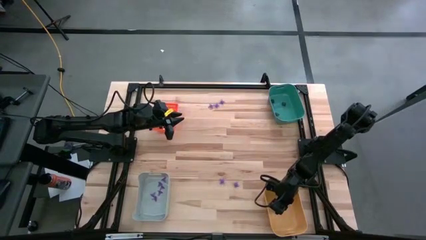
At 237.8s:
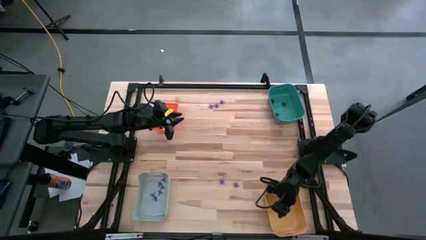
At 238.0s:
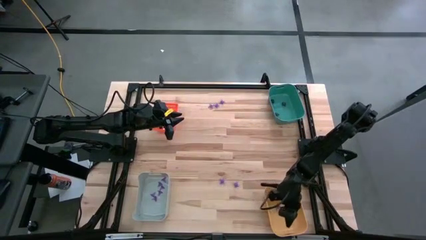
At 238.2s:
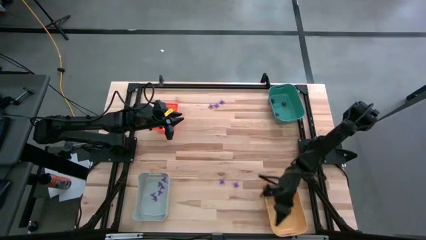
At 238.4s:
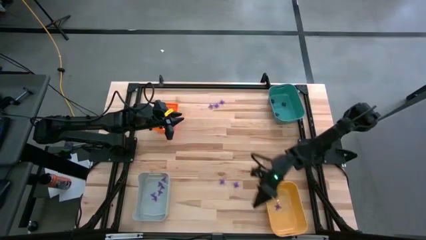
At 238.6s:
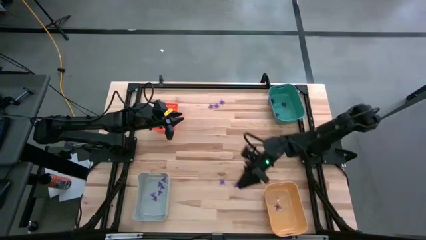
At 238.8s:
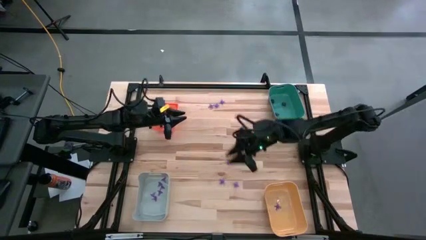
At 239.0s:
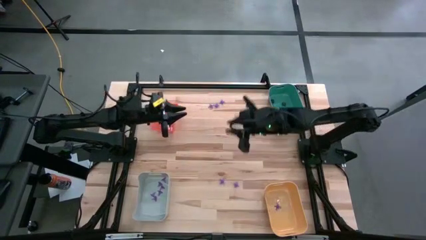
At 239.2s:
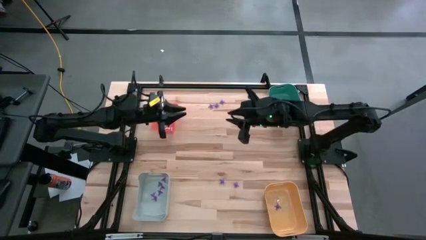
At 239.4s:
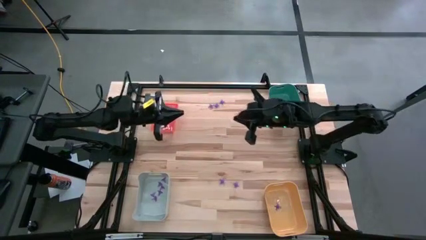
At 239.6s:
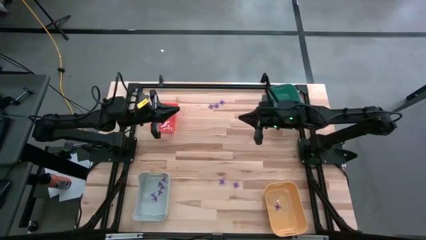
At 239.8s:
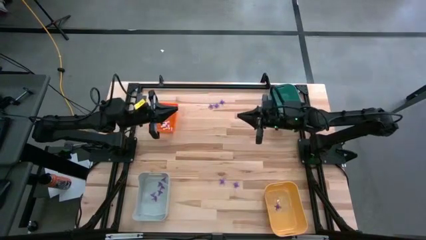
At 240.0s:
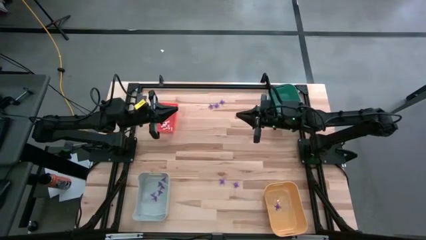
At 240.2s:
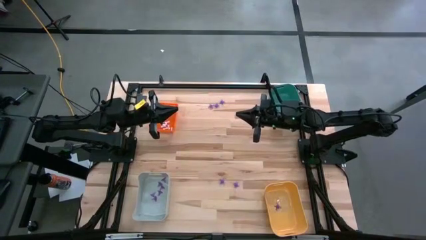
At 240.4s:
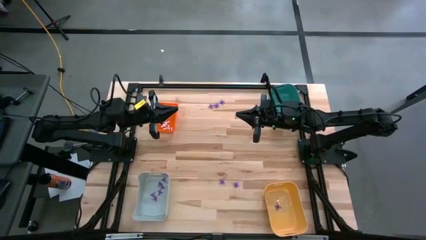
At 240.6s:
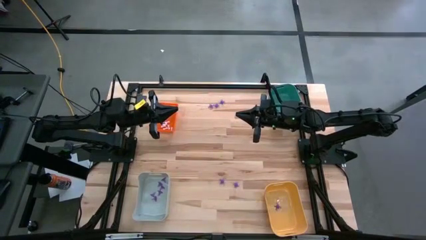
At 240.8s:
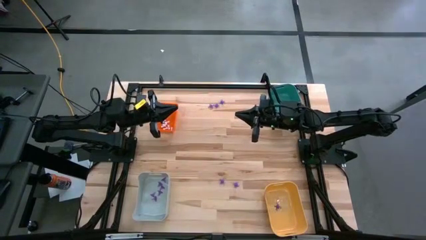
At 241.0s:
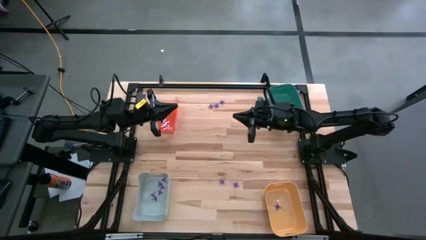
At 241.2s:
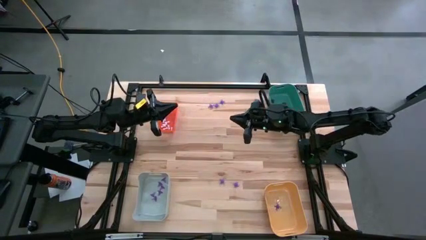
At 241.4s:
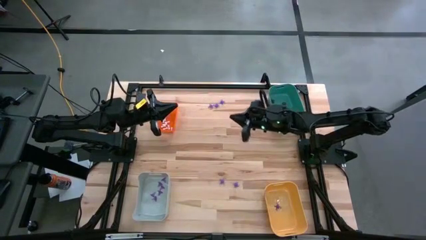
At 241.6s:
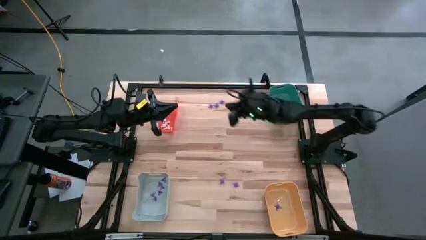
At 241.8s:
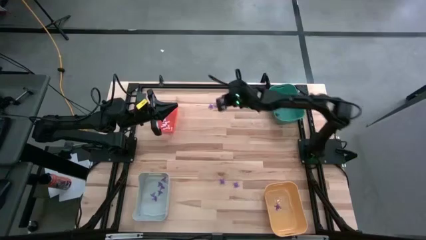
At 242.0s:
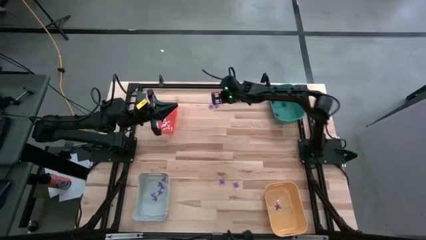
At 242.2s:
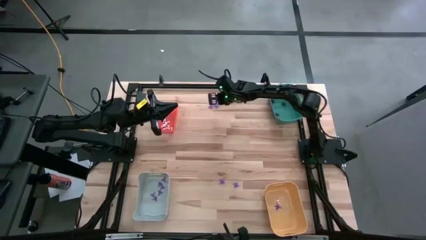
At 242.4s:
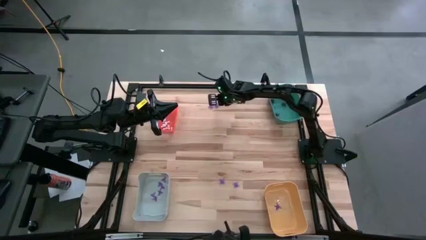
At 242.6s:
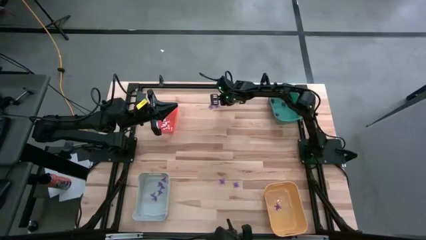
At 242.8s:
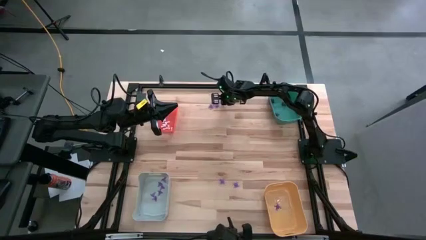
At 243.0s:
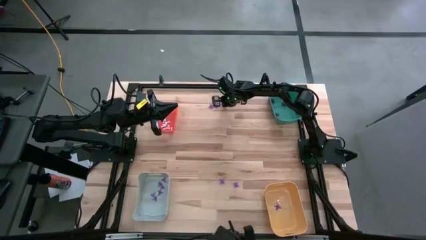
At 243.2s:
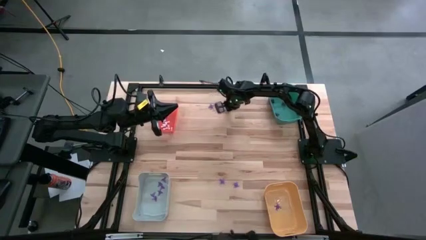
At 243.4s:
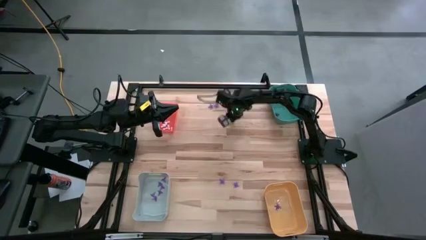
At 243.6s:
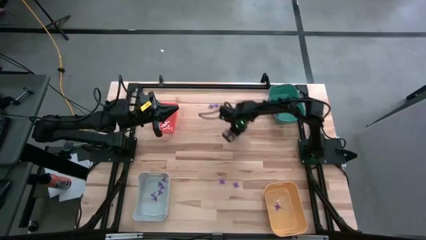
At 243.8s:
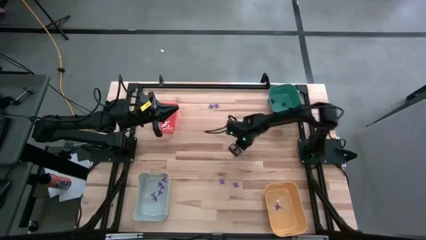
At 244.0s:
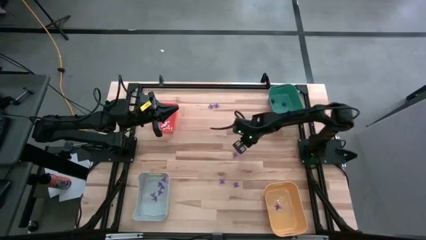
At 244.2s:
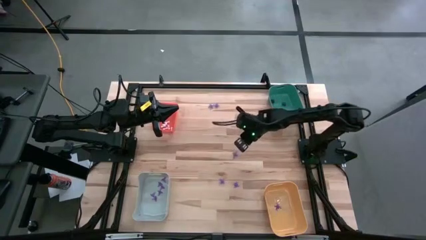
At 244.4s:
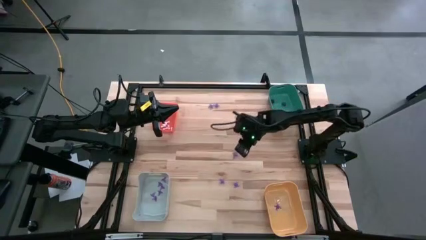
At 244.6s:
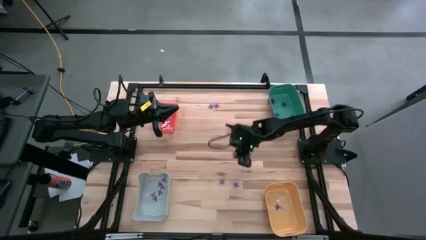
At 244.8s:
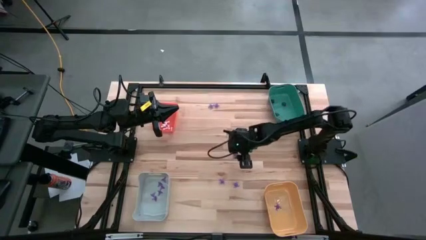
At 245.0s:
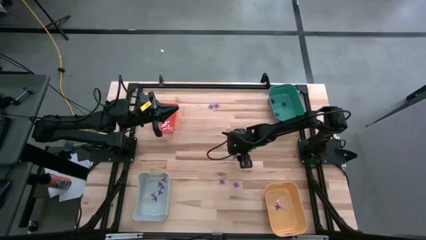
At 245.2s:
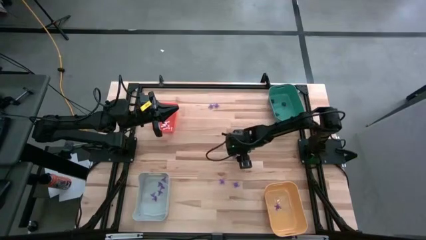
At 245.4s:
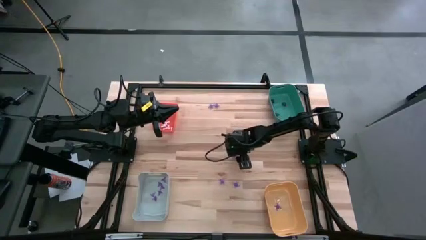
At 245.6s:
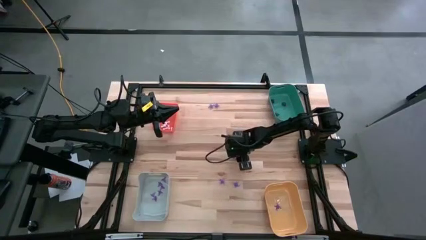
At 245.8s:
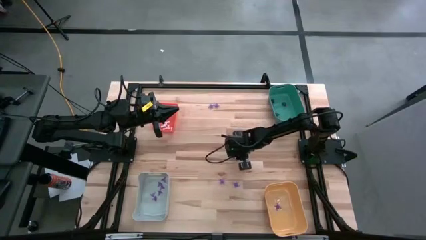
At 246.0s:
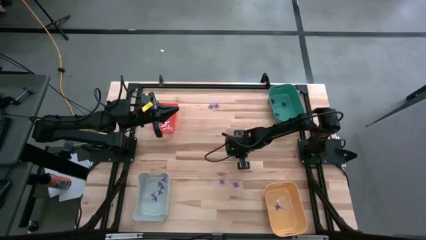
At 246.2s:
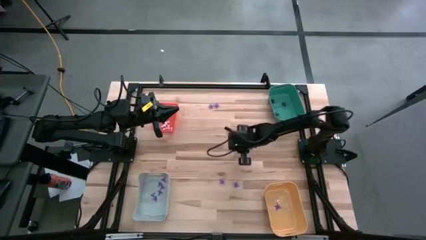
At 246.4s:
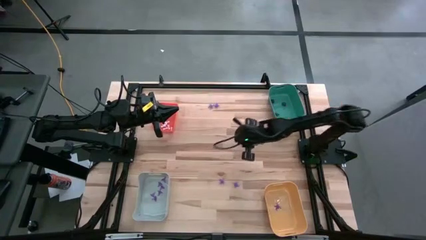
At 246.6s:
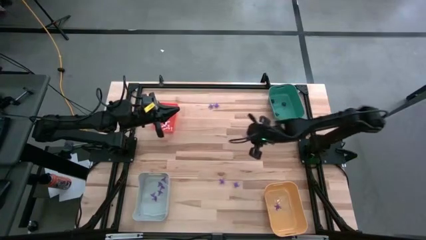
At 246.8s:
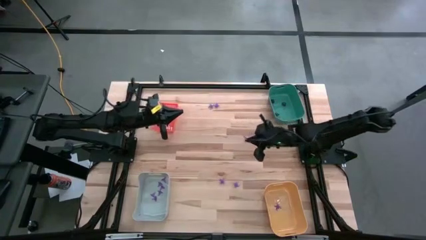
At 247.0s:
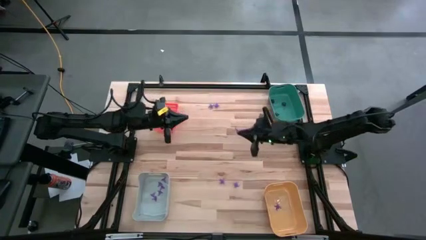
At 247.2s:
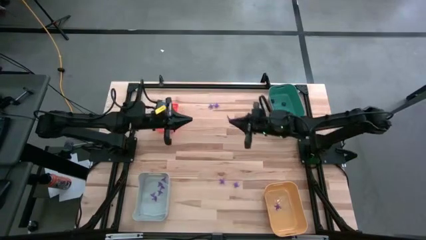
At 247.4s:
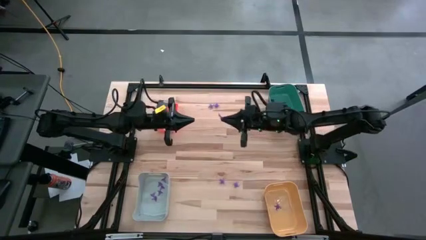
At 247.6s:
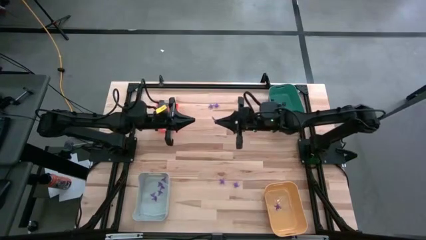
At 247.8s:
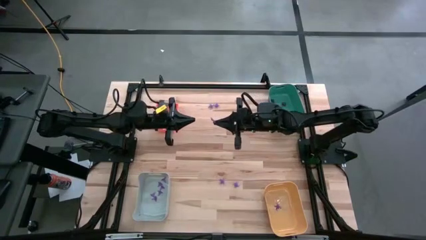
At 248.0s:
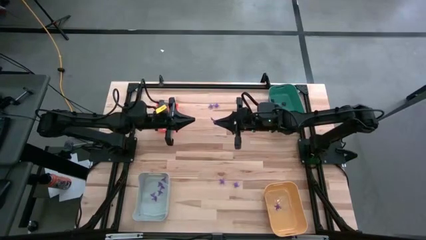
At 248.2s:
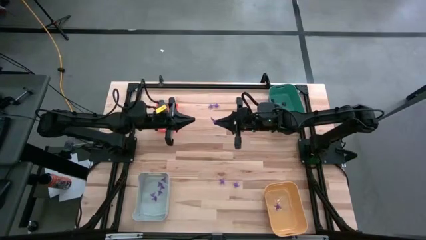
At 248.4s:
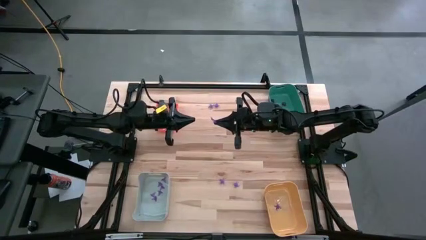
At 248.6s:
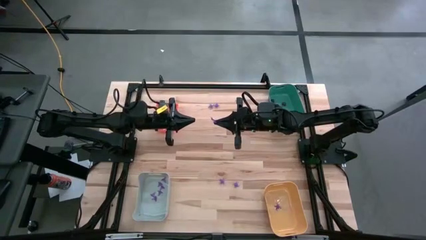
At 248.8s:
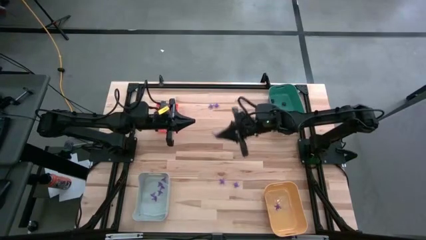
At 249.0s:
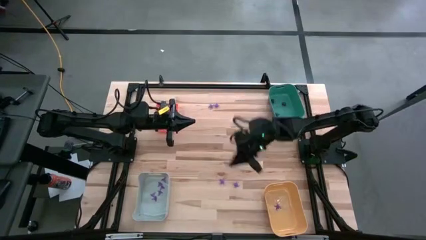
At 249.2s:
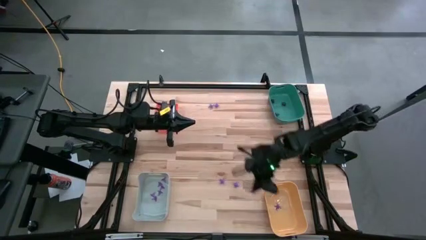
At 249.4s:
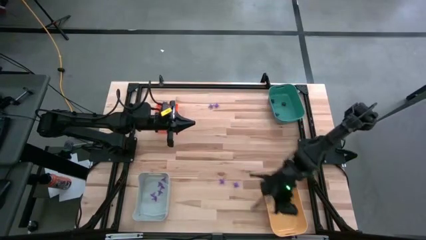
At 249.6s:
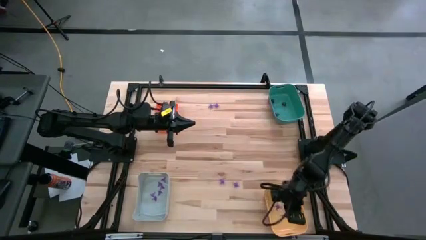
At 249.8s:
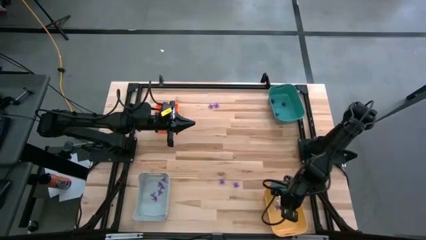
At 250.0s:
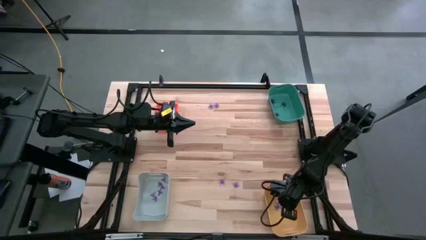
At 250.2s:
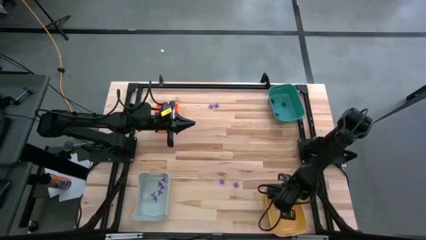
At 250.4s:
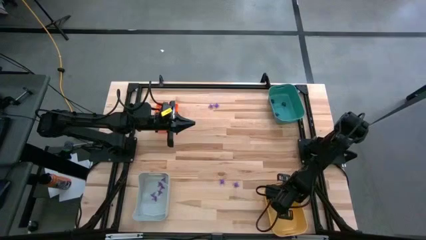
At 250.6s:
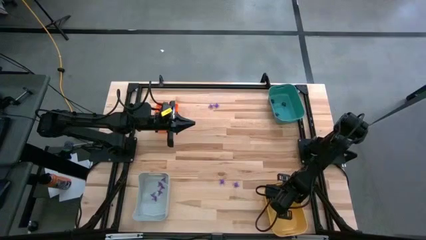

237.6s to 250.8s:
Task: Sort Halloween decoration
Put the violet spider toy into the yellow bin
